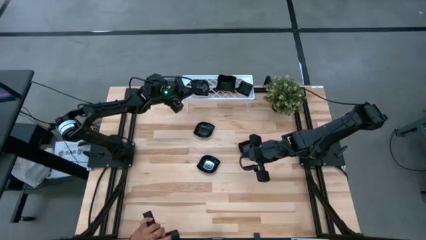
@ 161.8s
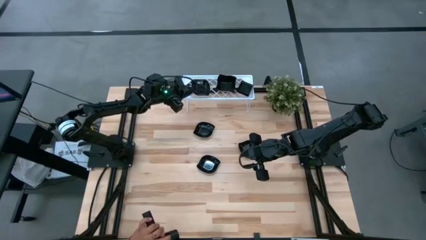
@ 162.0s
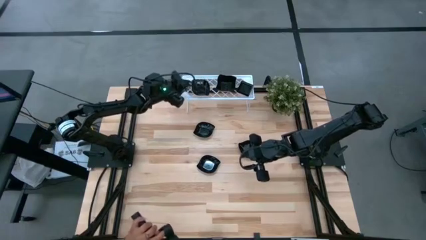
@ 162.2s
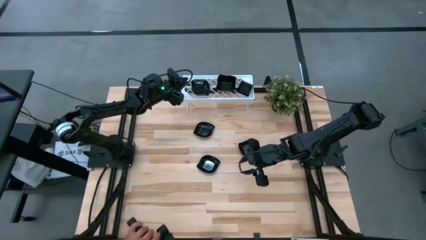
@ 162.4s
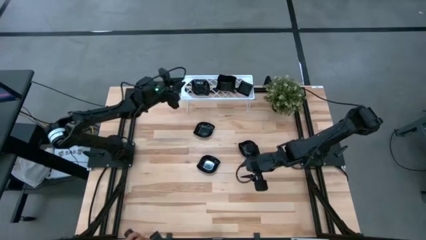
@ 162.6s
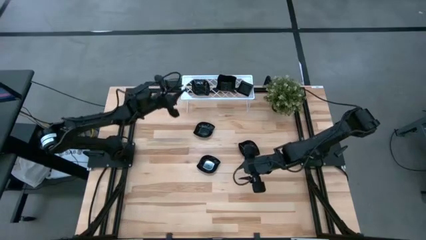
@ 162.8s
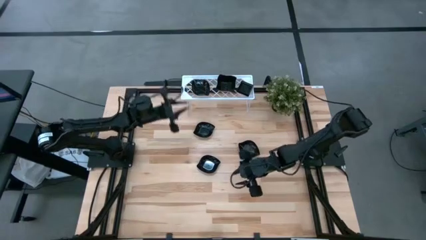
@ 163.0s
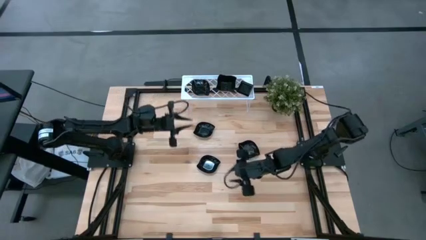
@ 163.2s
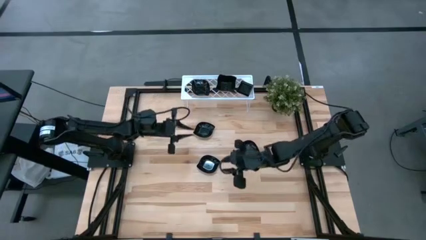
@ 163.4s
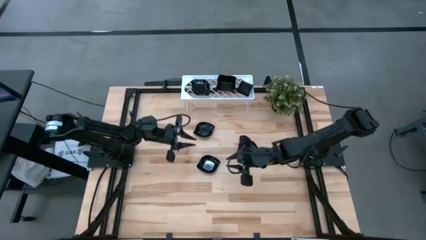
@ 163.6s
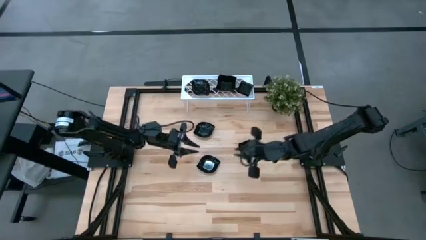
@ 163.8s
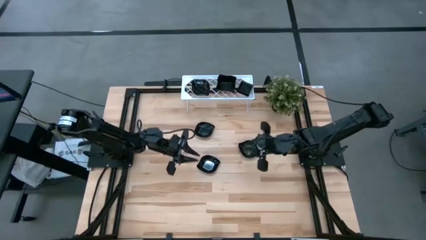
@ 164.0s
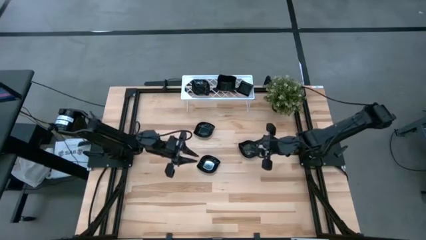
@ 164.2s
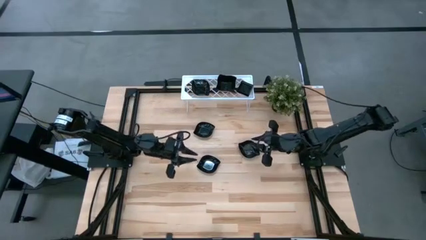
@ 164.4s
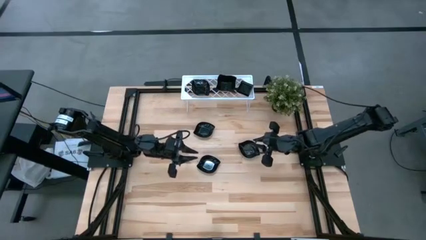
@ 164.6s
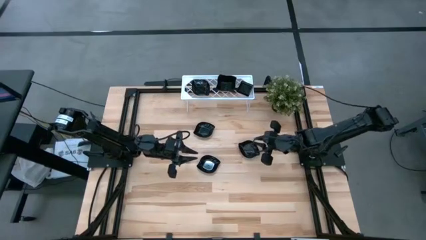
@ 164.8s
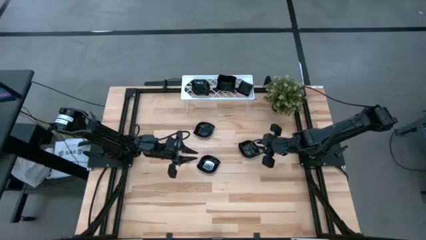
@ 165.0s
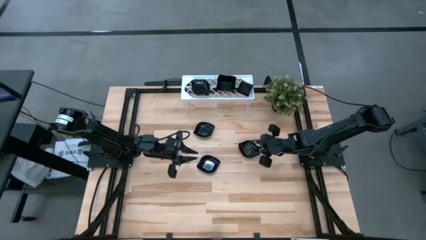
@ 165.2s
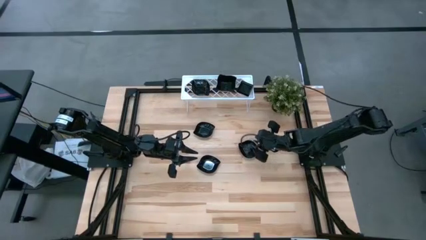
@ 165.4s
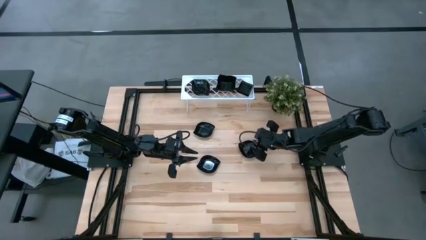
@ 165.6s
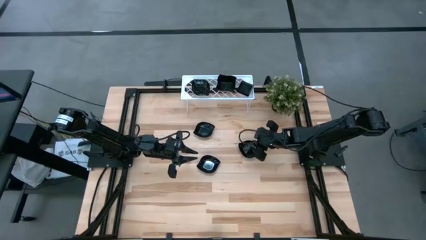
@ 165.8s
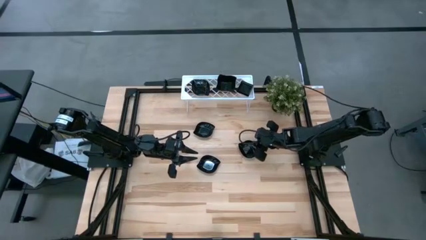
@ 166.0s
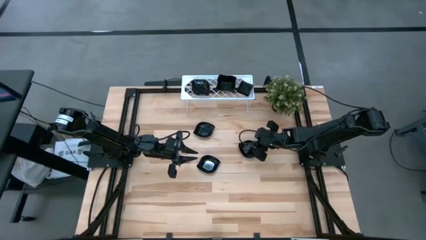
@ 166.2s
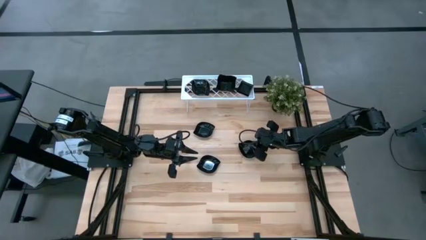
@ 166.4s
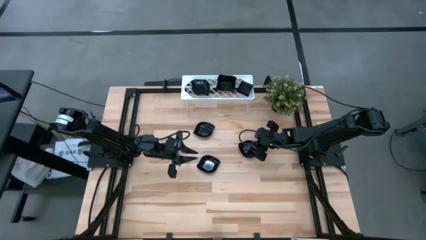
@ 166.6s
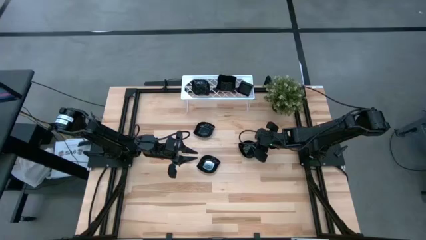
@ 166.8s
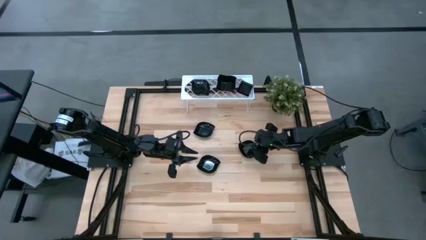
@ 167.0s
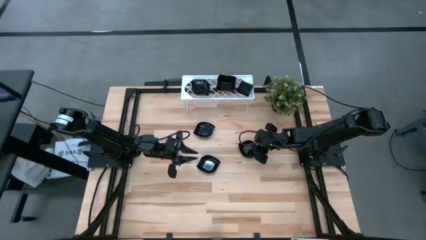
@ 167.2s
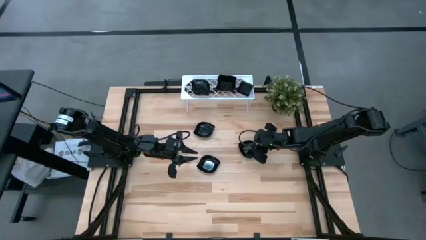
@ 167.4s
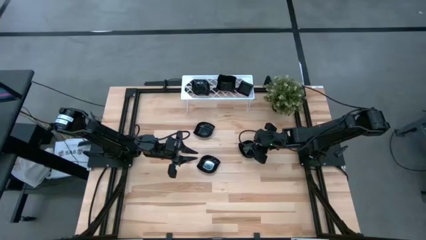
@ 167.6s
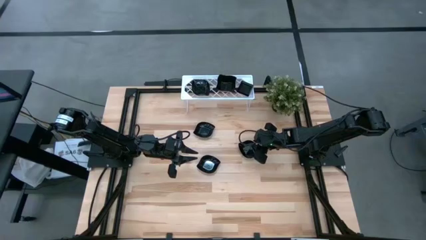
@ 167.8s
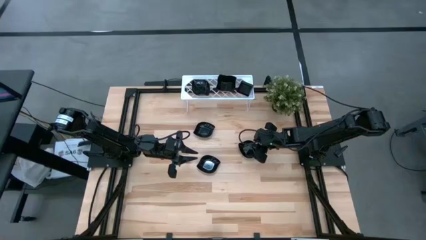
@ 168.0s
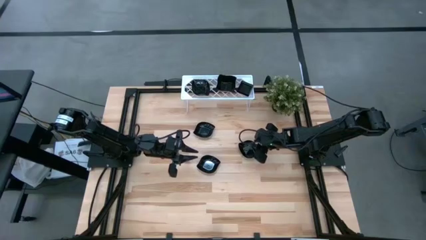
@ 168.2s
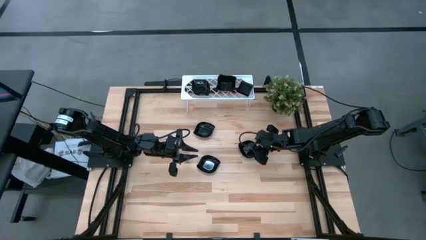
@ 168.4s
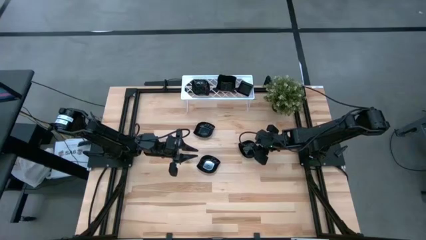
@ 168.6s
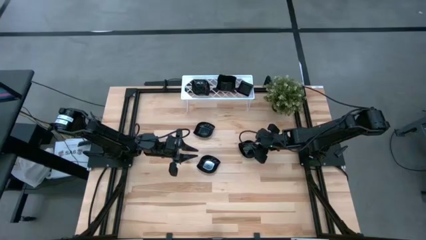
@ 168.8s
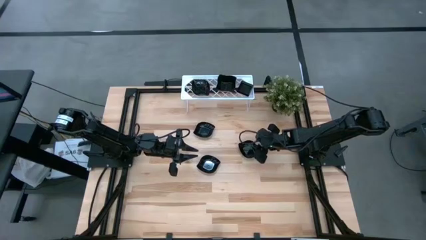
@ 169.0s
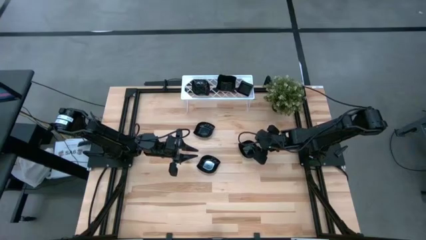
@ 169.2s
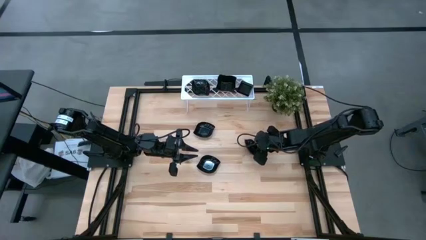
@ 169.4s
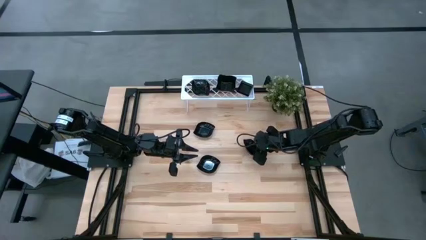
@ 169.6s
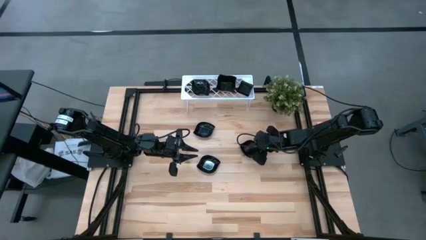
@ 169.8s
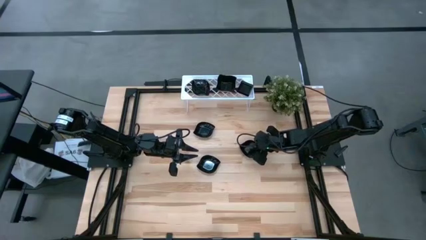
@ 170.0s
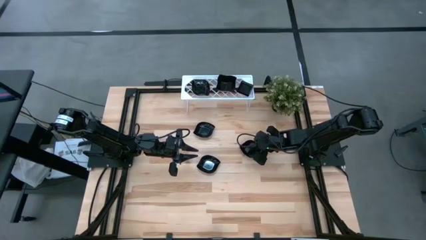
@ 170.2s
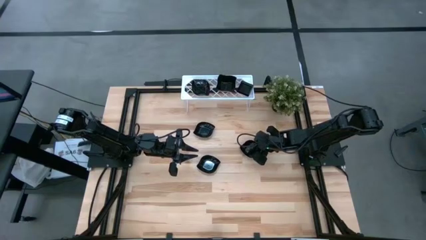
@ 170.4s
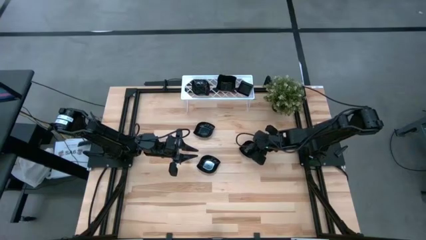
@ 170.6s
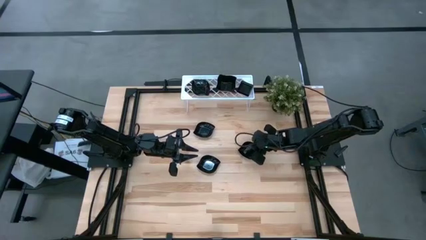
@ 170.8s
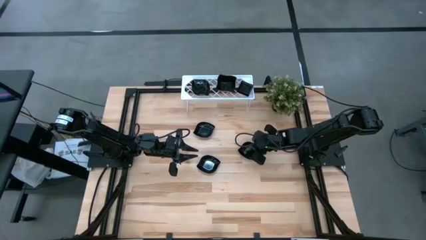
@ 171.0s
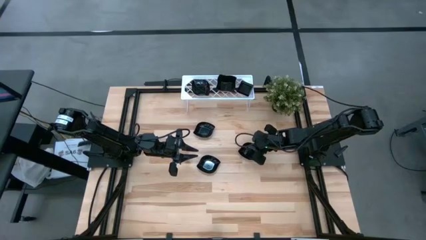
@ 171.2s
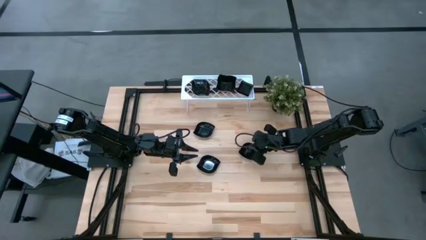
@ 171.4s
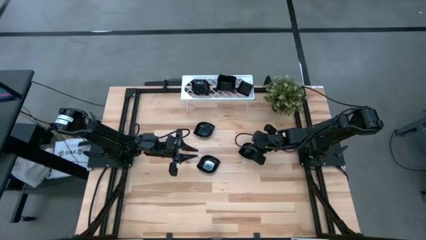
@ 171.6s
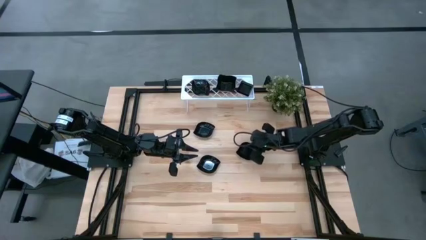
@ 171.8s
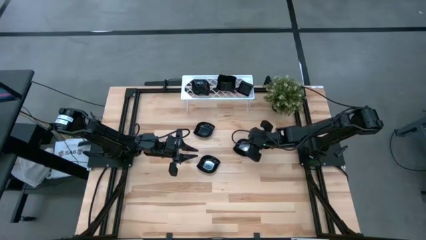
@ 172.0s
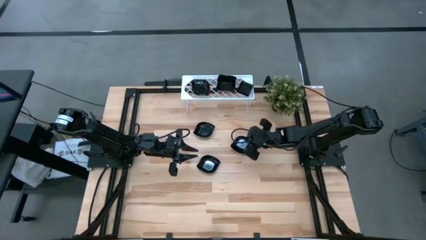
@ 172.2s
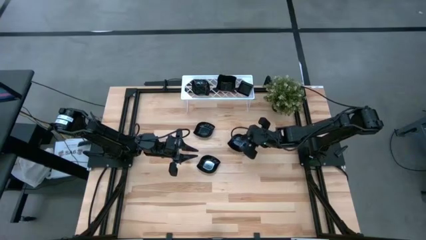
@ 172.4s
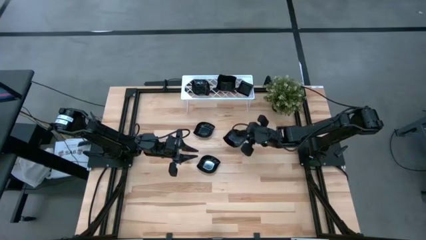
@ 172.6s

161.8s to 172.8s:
Task: Pick & Place Mini shaped plates
Stack the black leaf-shaped plate on top of the black leaf-shaped plate on the shelf

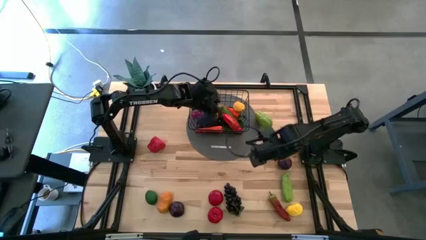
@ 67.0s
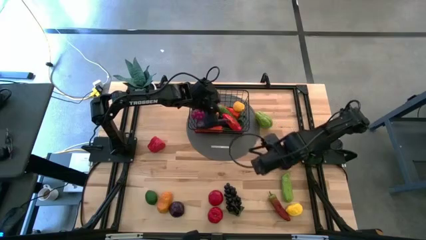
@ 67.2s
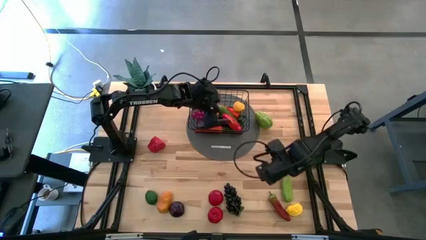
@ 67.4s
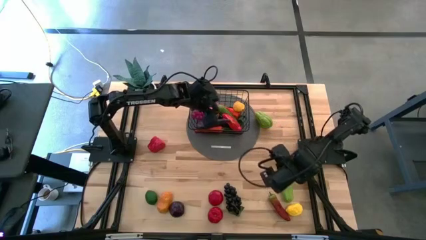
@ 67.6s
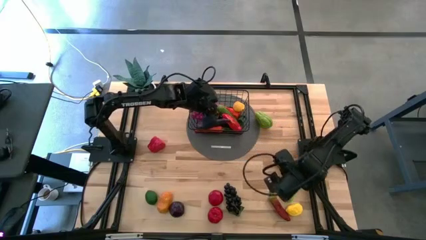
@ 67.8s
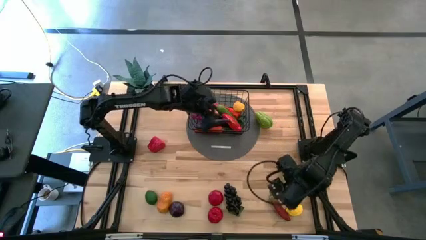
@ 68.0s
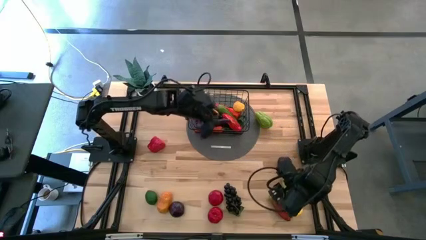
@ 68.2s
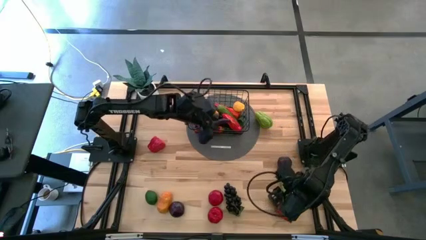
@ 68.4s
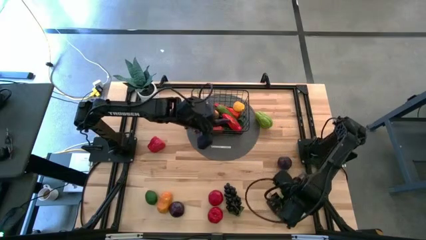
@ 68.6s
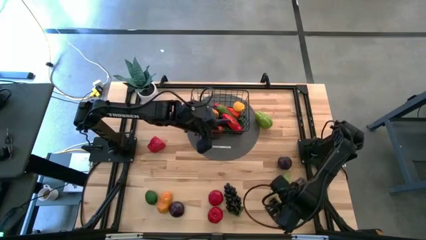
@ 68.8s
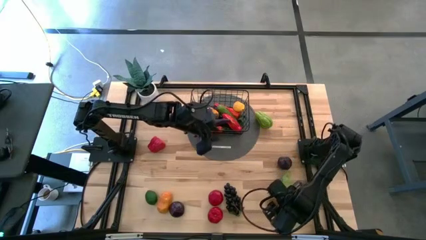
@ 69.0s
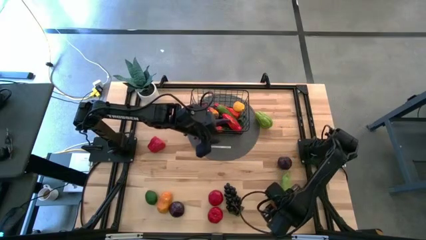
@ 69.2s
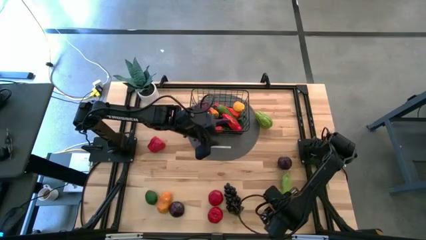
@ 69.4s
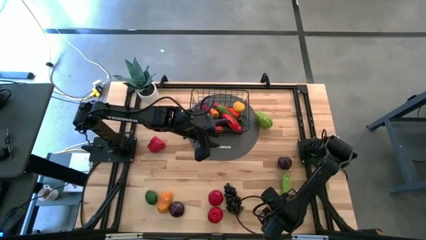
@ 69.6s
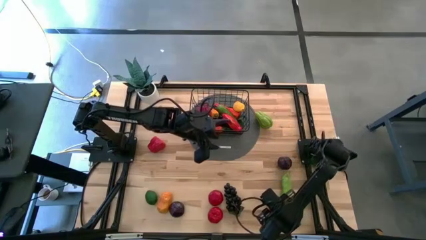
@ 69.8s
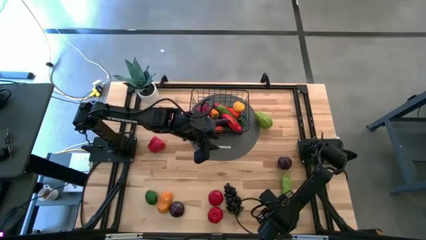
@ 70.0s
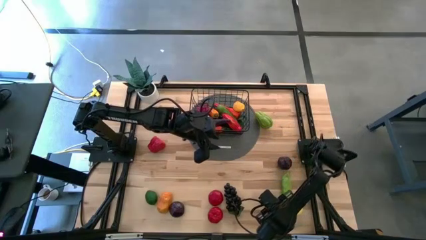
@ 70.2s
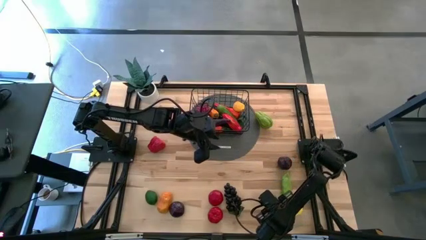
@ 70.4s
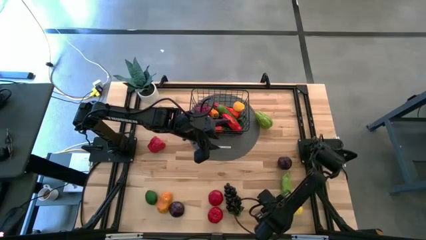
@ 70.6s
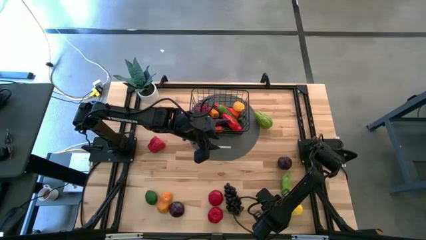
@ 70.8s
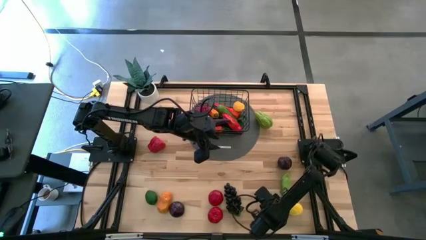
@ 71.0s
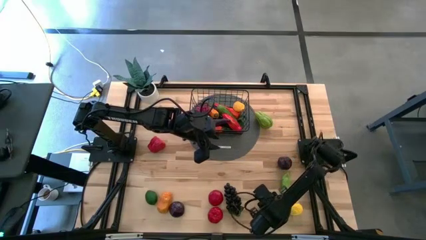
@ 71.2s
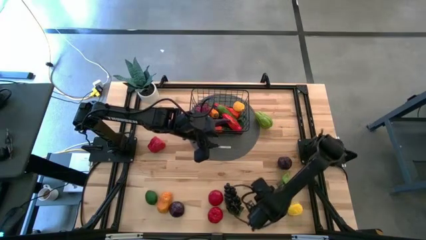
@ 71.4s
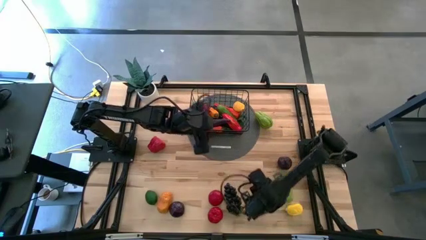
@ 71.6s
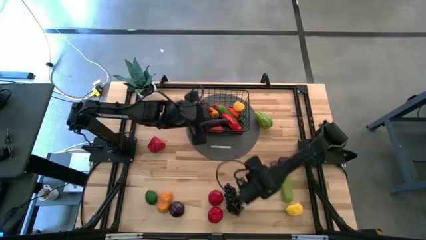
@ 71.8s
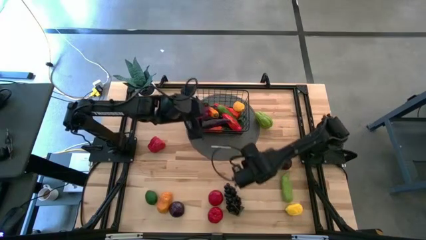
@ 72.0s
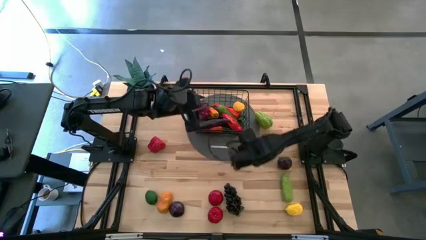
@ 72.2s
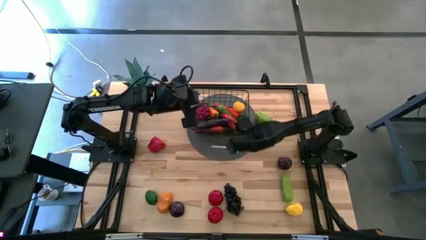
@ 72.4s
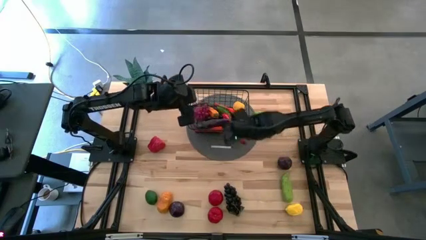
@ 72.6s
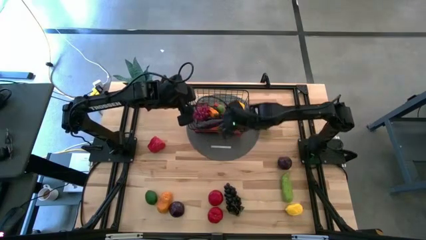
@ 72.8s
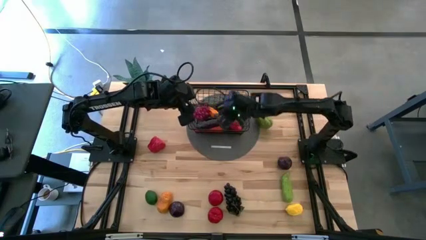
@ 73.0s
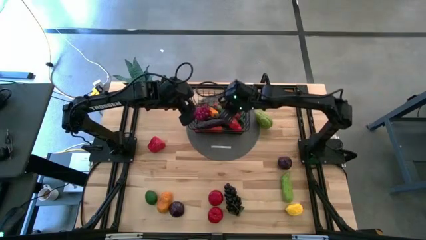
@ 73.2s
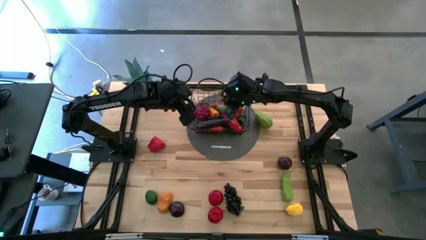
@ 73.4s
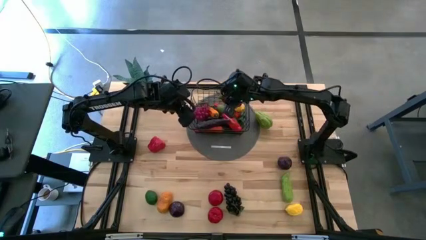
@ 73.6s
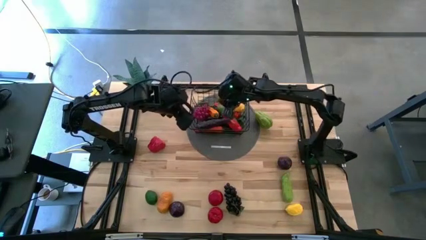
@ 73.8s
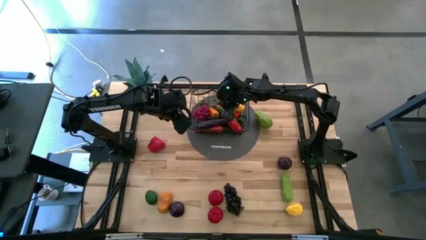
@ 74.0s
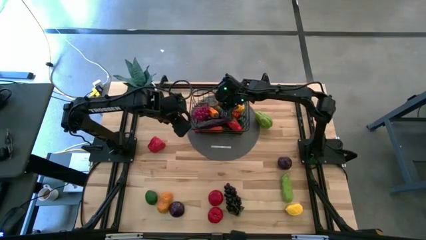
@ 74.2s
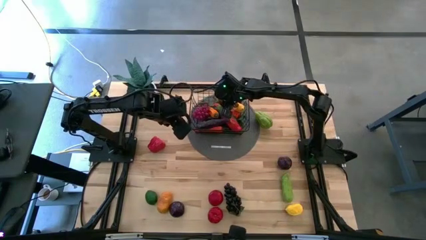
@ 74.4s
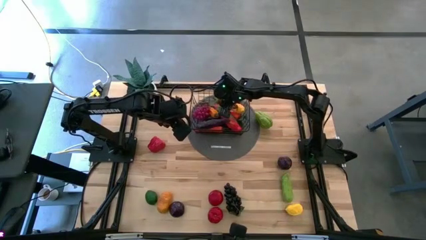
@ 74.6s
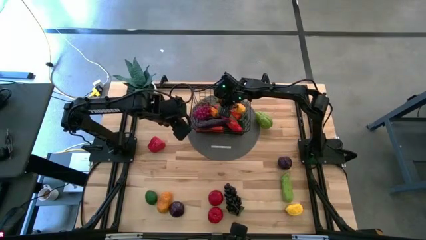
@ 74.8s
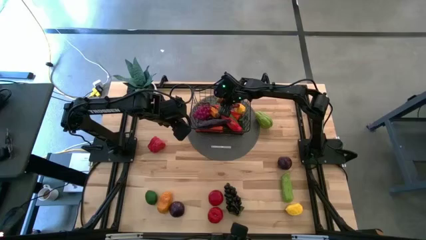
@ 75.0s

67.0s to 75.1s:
Task: Build produce basket
Put the red chili pepper into the wire basket
